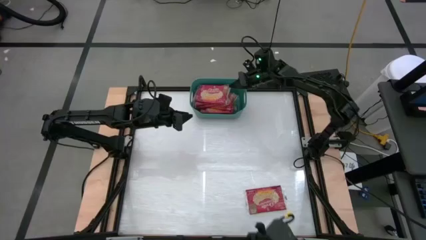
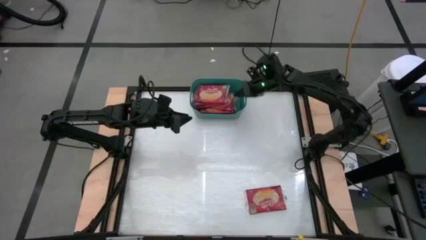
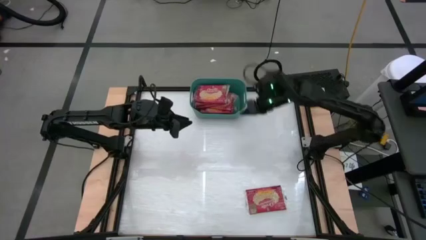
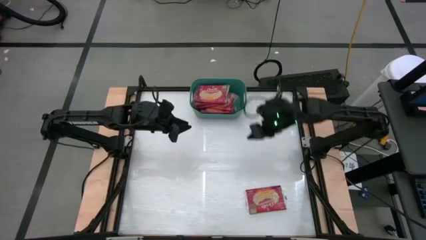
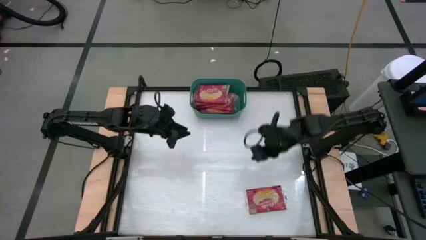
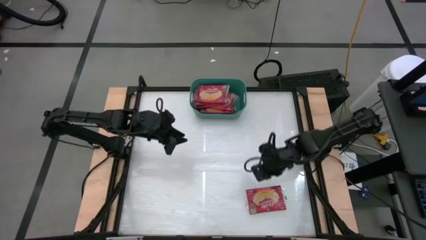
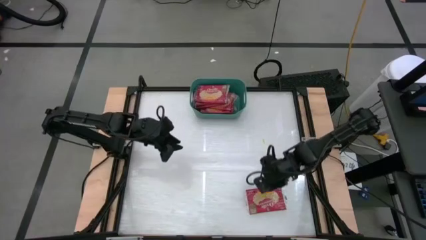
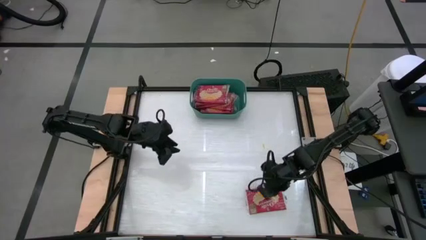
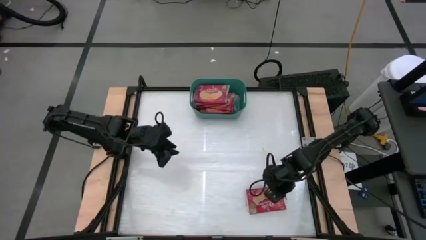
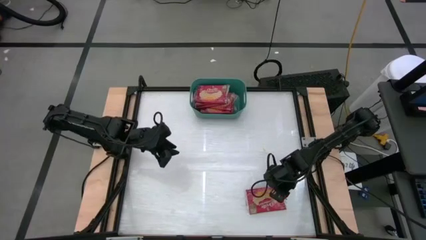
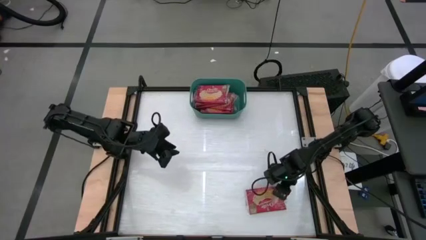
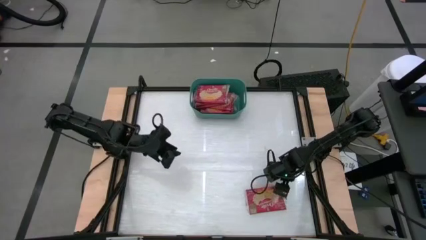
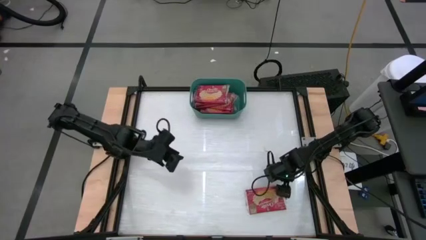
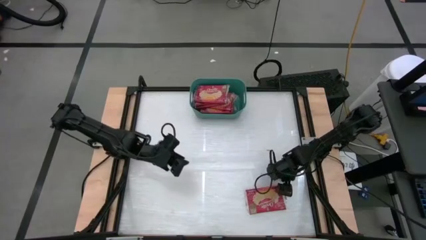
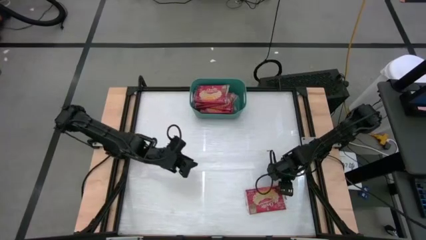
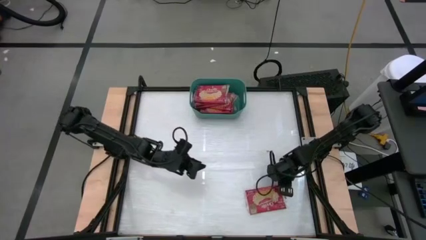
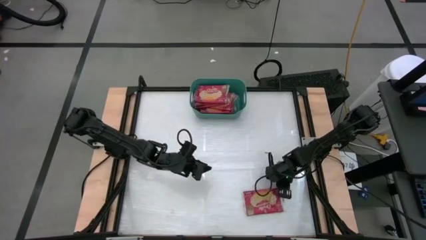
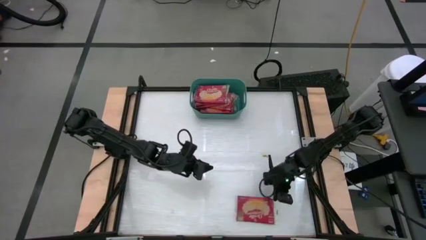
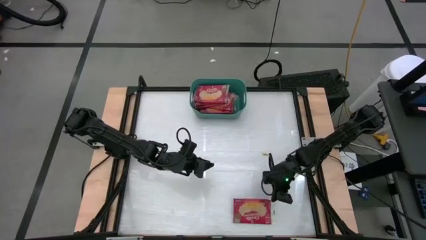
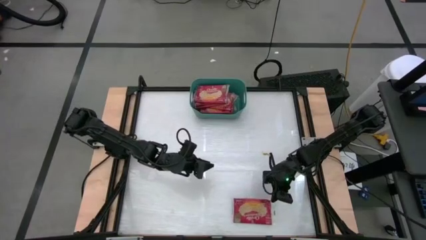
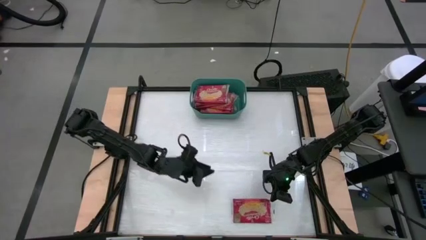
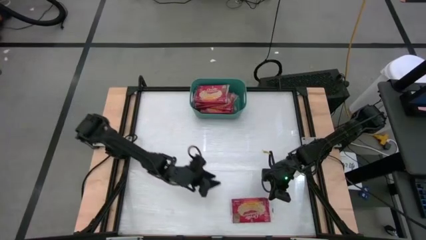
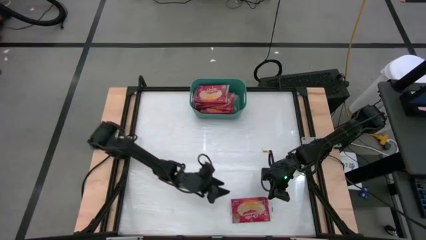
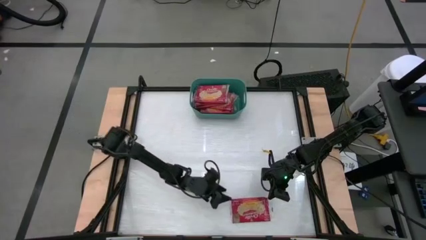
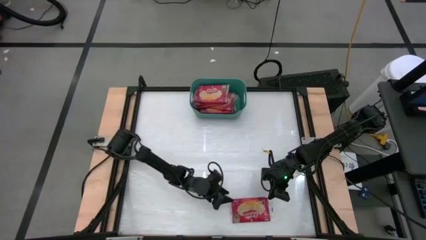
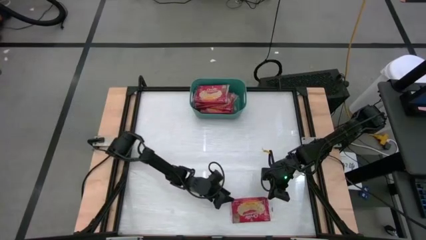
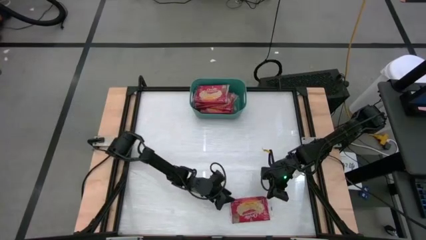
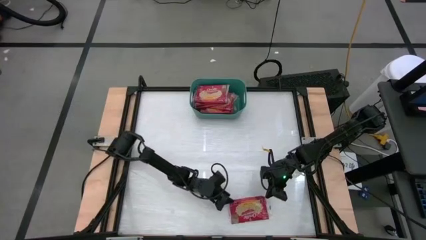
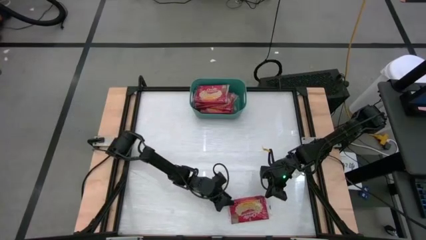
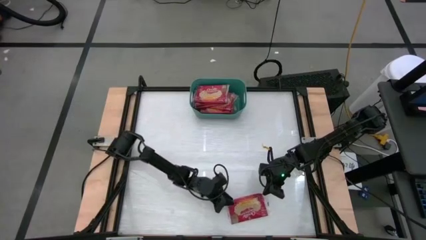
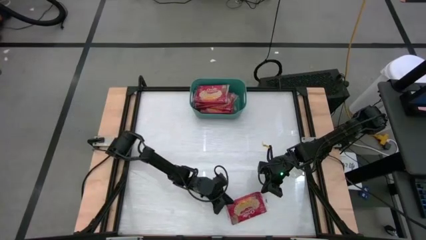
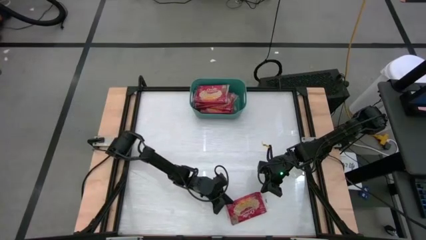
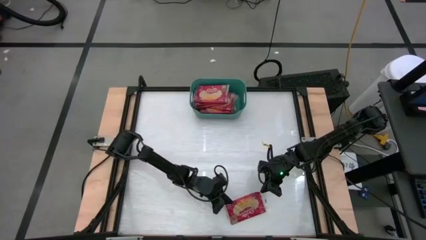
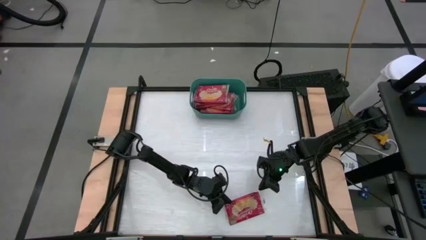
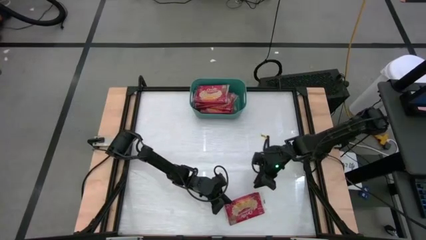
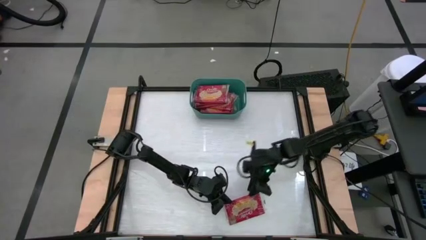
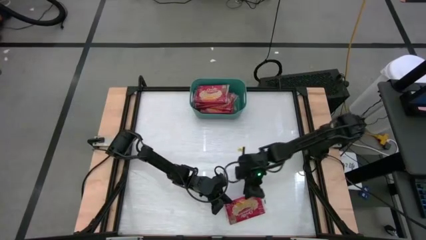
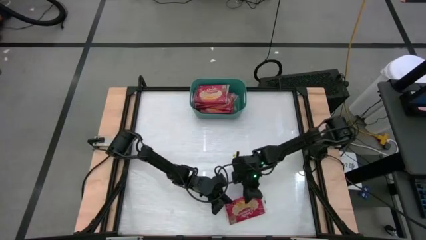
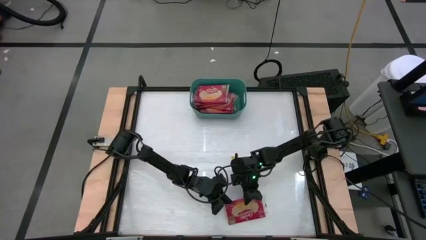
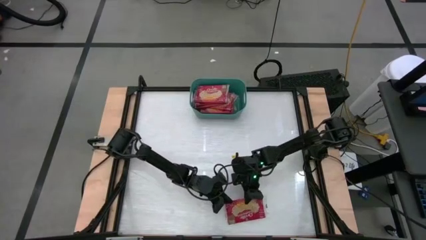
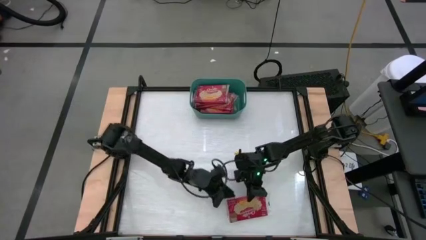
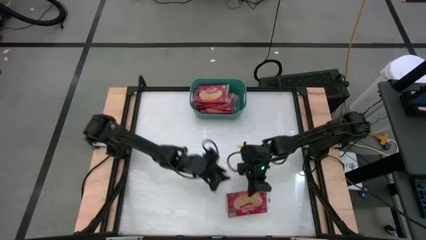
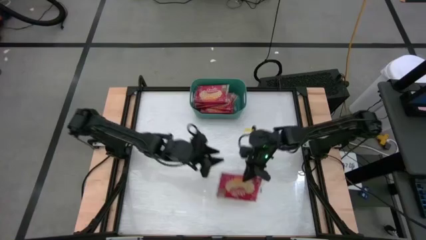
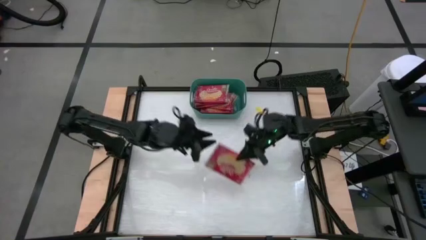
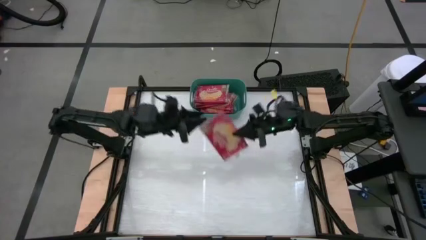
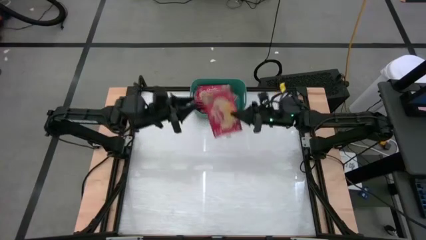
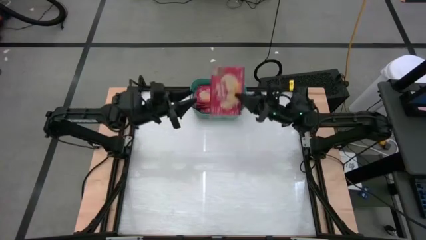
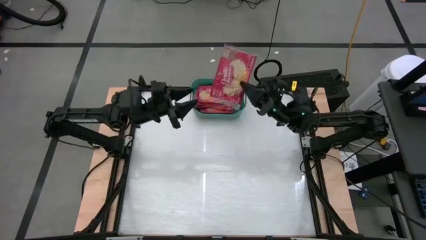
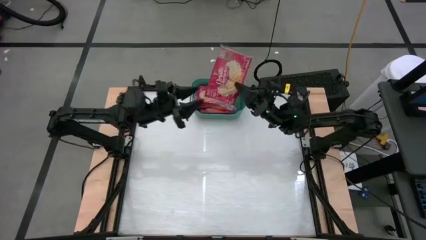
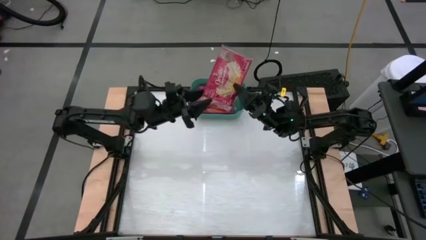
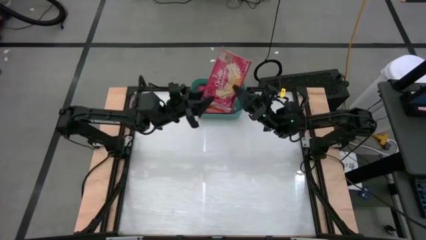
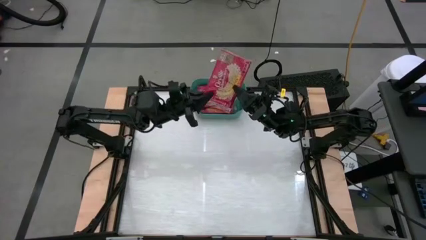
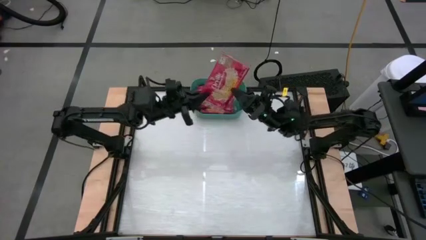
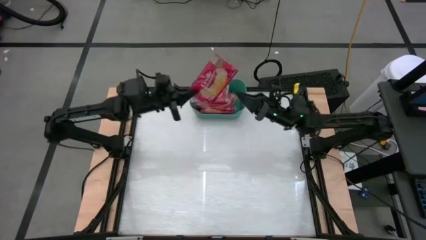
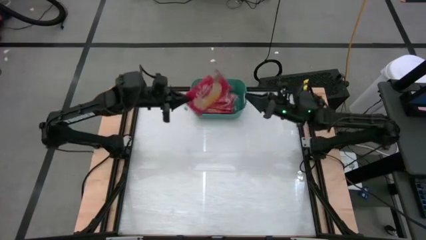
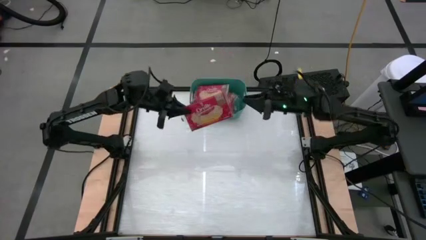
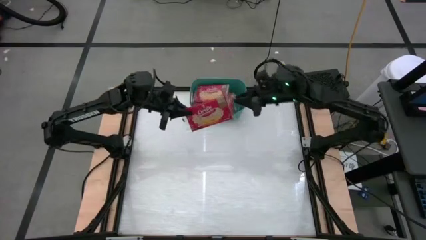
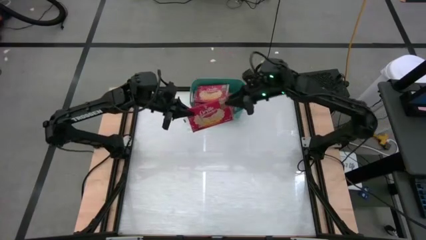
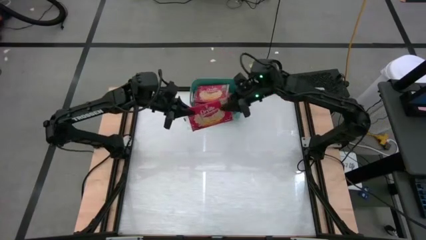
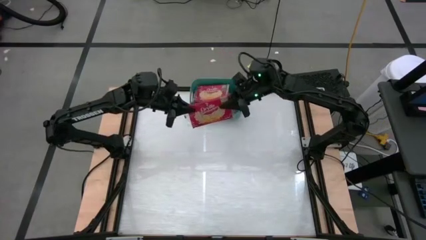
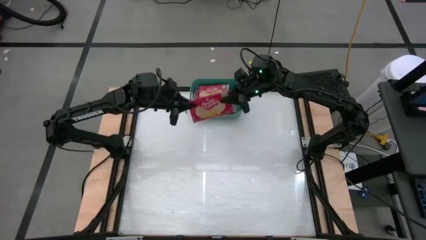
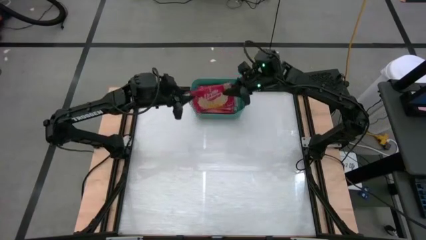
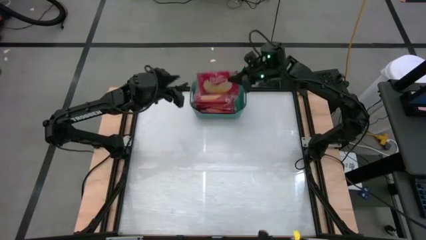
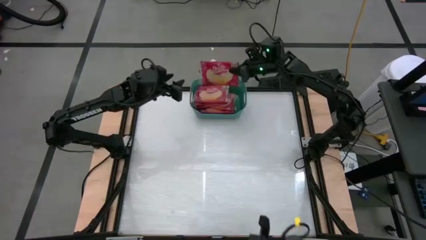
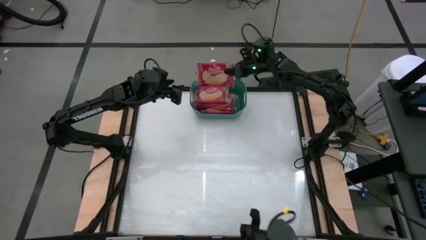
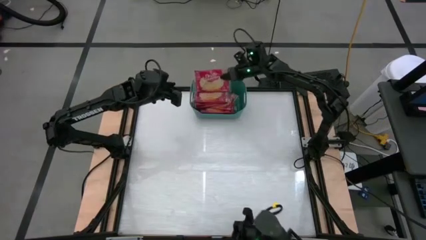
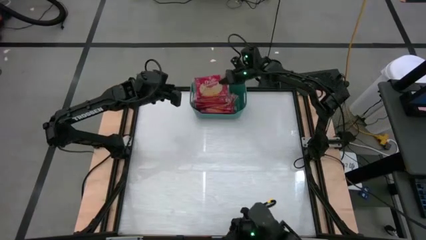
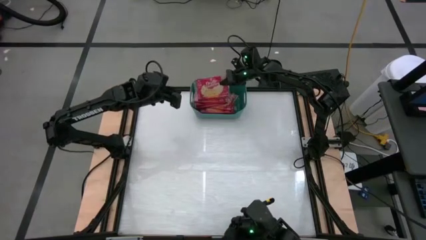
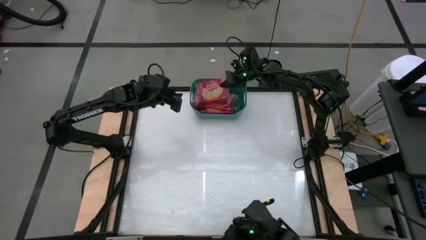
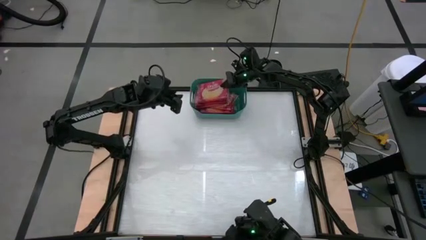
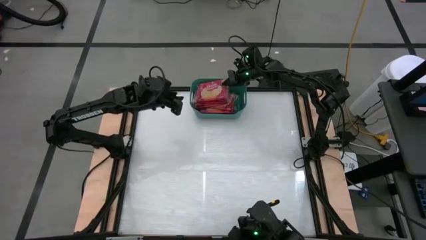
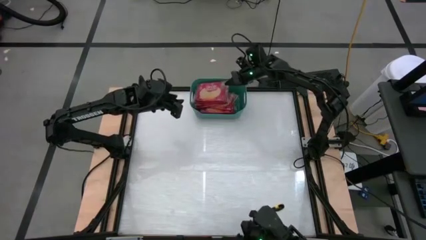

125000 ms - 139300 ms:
Task: Sort popcorn bags into baskets
Put the red popcorn pack into the green bin

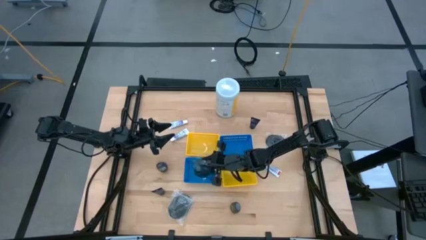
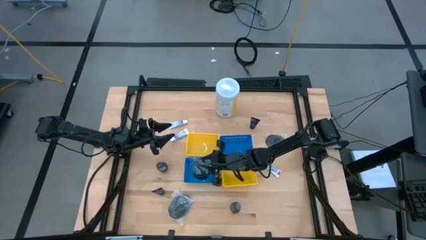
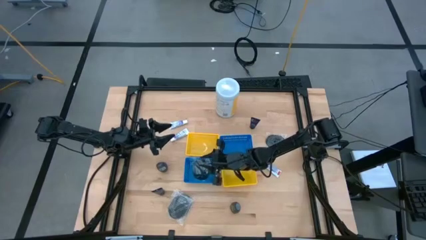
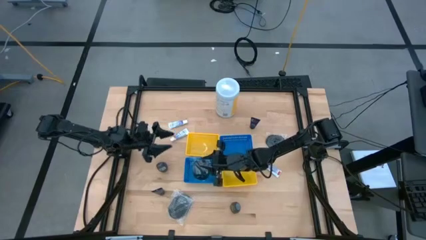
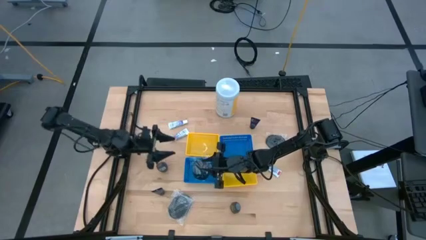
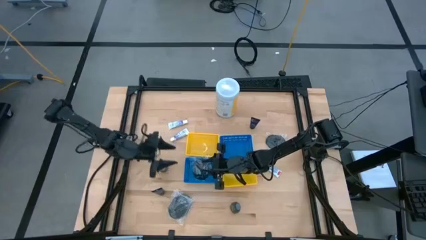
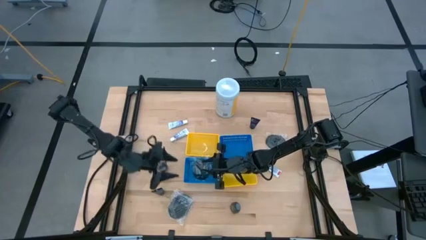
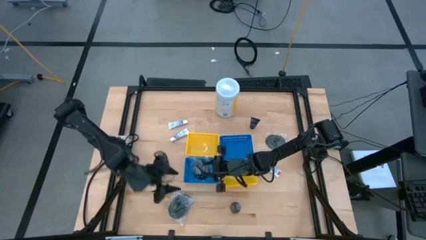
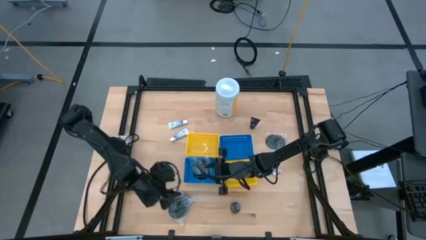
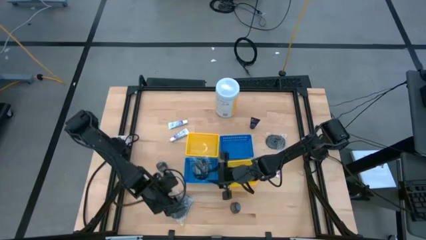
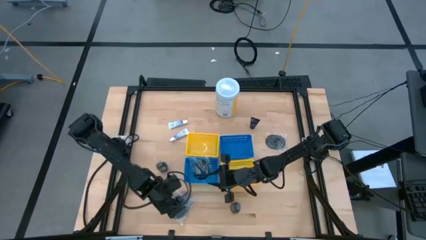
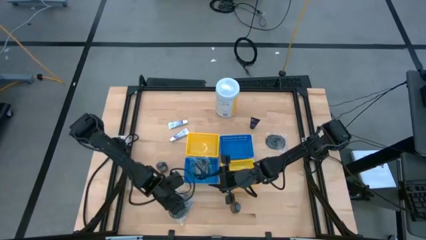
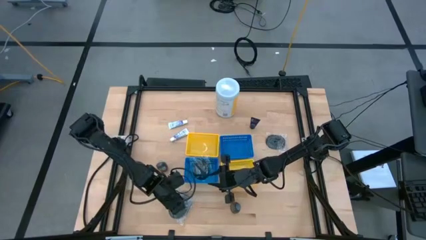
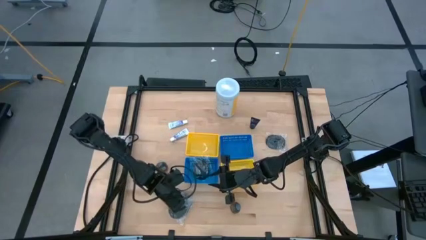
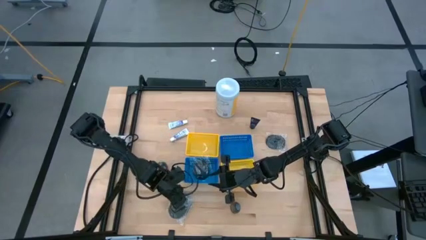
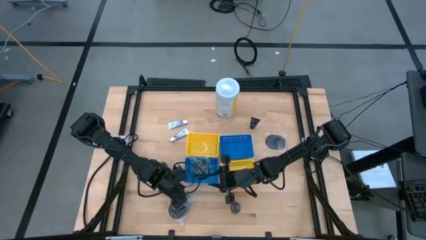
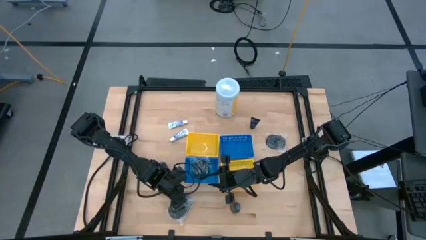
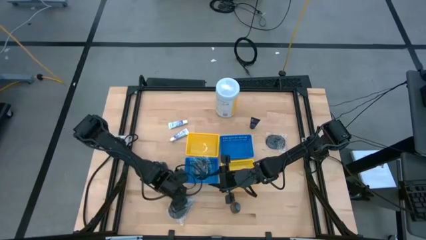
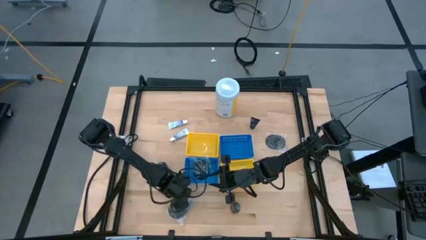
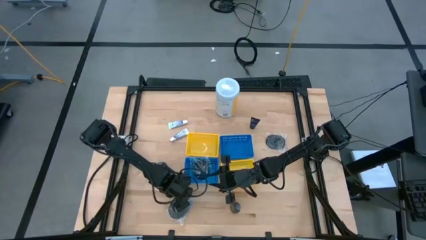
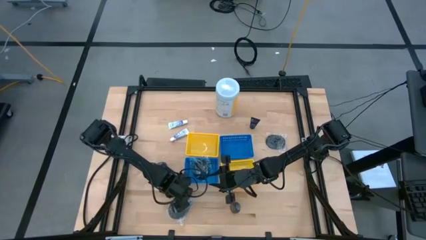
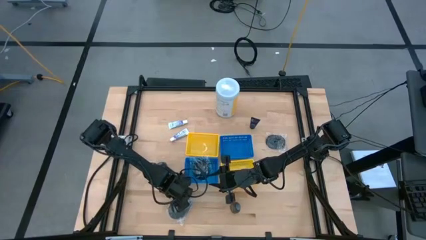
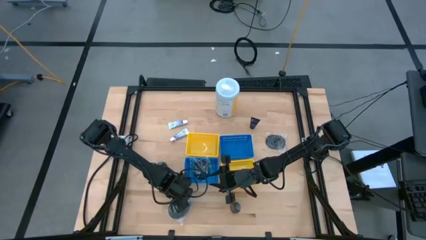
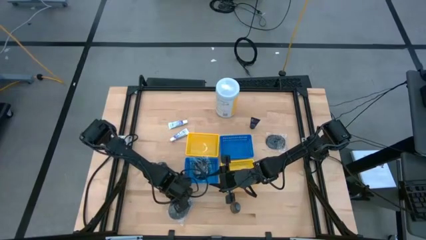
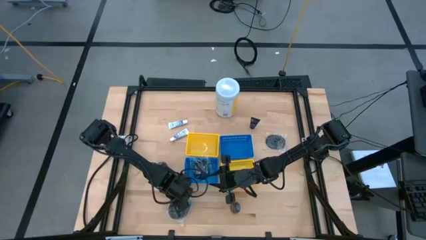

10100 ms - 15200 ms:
Task: Pick & Place Travel size toiletries
Put the black hairbrush into the bottom blue bin
